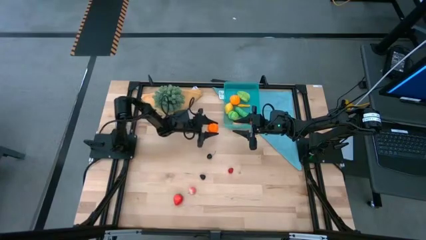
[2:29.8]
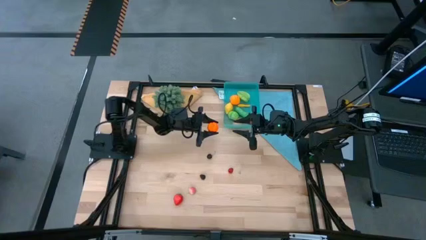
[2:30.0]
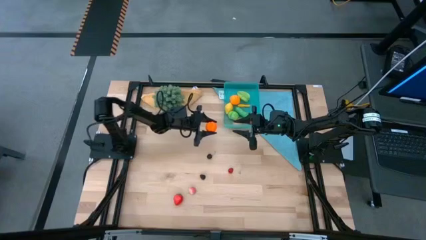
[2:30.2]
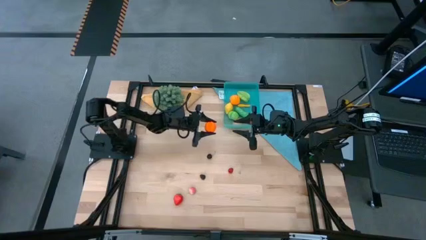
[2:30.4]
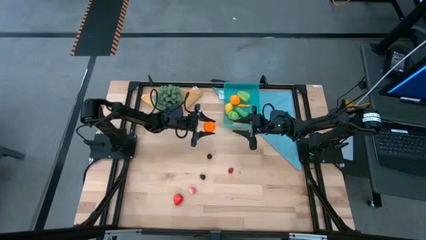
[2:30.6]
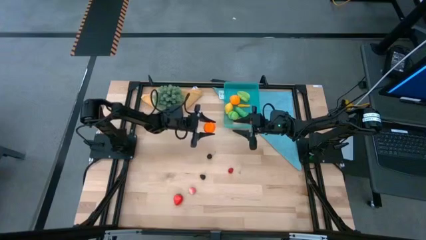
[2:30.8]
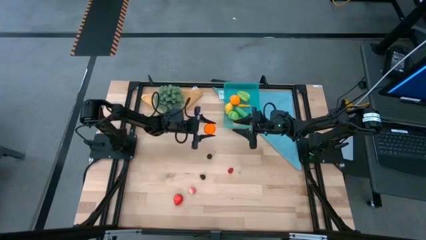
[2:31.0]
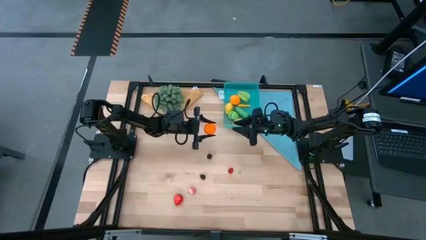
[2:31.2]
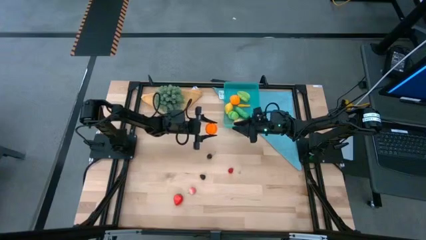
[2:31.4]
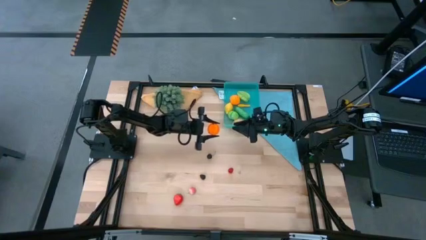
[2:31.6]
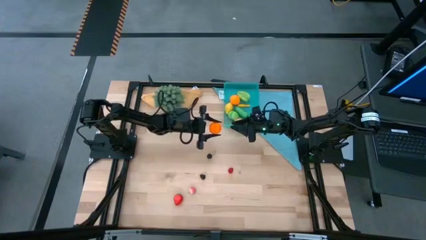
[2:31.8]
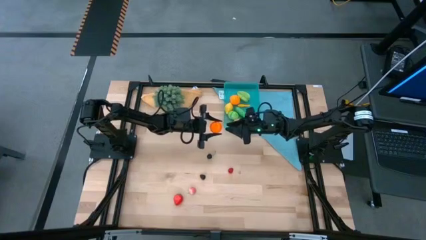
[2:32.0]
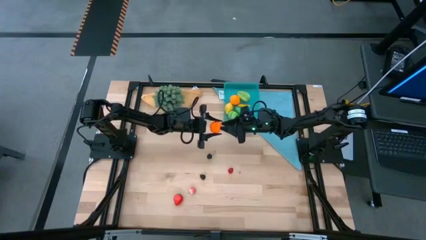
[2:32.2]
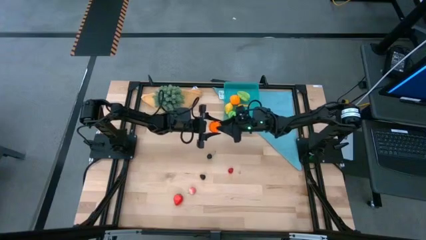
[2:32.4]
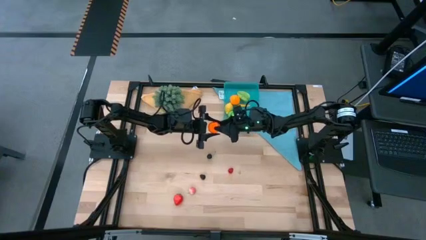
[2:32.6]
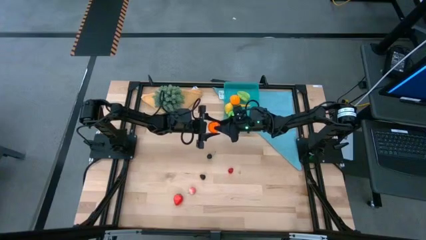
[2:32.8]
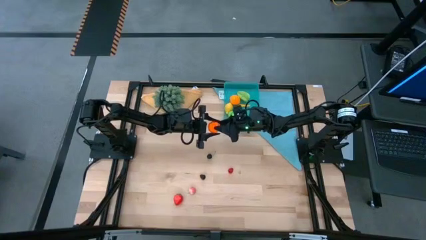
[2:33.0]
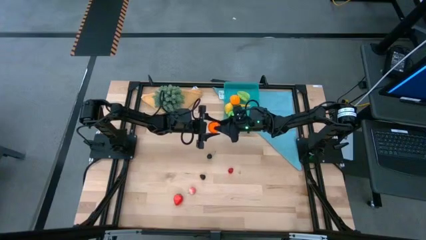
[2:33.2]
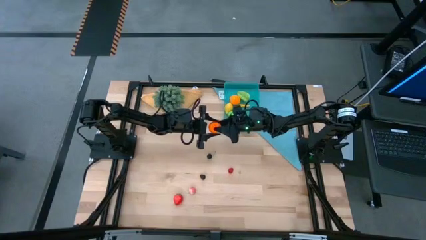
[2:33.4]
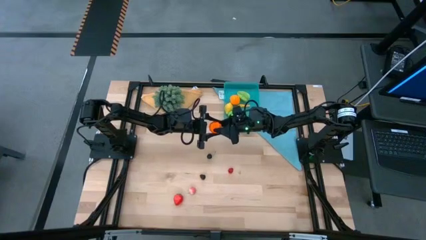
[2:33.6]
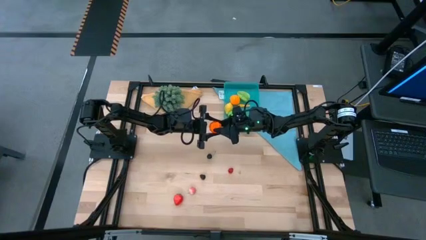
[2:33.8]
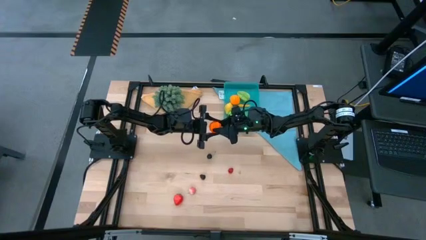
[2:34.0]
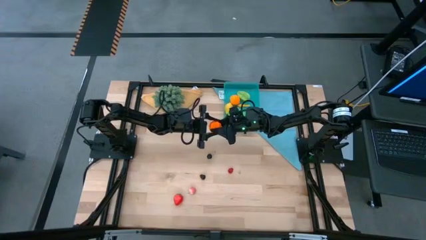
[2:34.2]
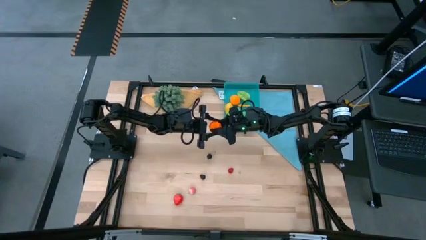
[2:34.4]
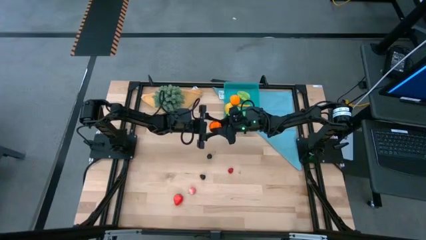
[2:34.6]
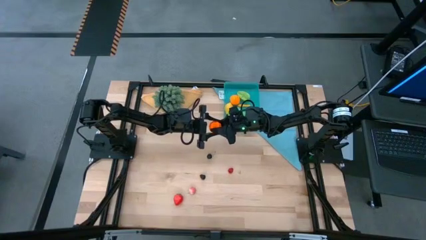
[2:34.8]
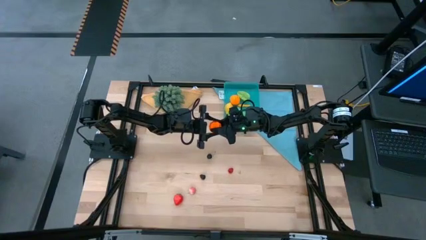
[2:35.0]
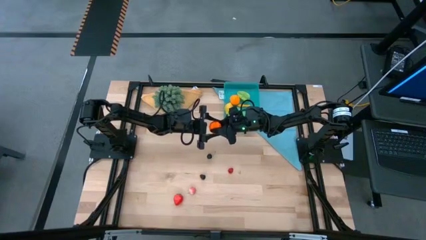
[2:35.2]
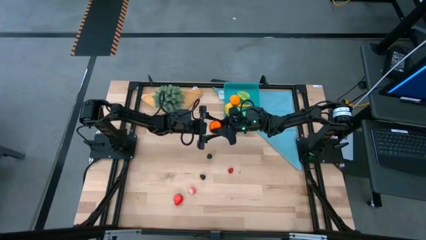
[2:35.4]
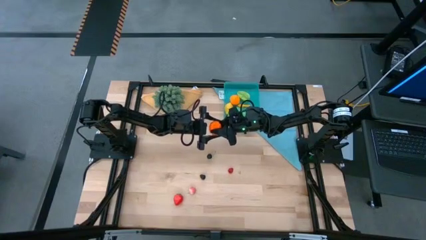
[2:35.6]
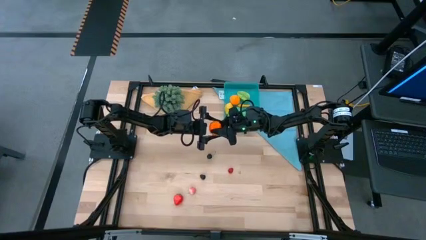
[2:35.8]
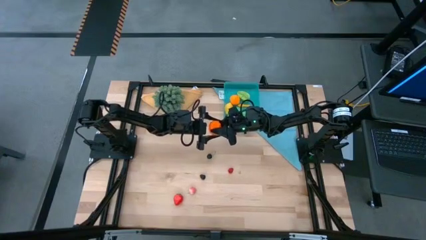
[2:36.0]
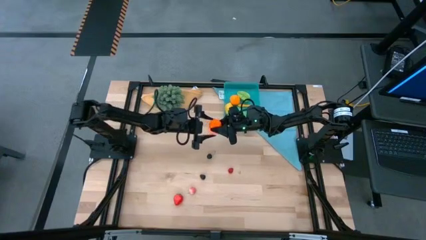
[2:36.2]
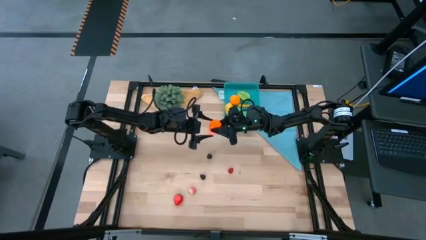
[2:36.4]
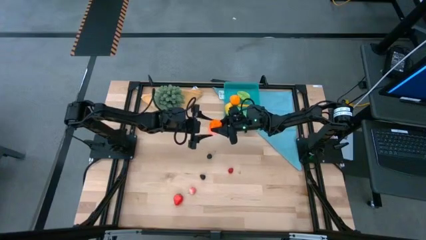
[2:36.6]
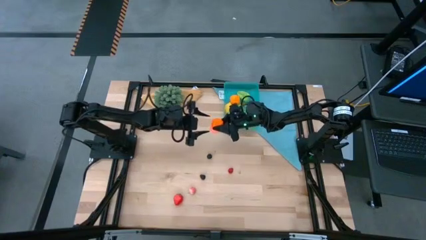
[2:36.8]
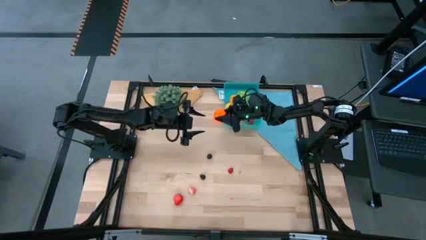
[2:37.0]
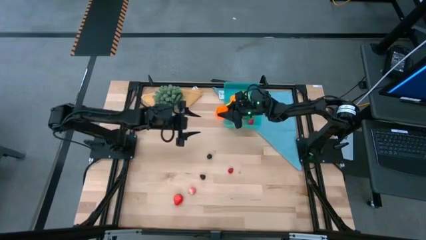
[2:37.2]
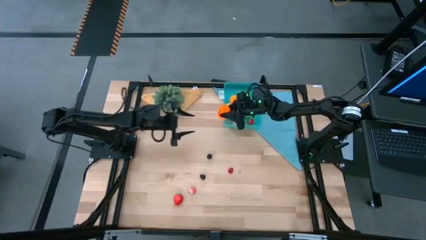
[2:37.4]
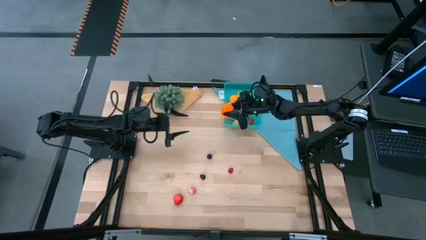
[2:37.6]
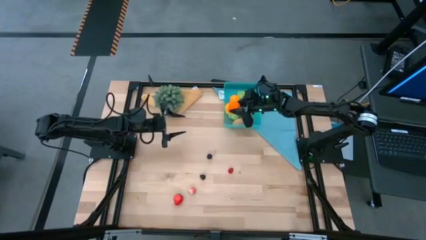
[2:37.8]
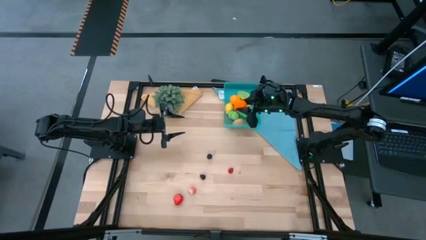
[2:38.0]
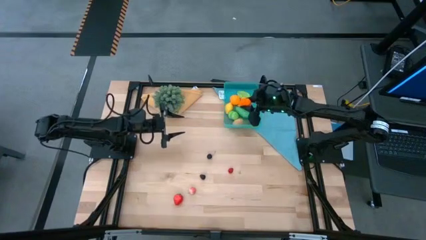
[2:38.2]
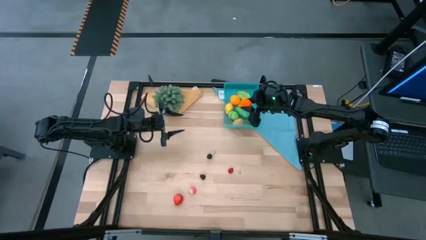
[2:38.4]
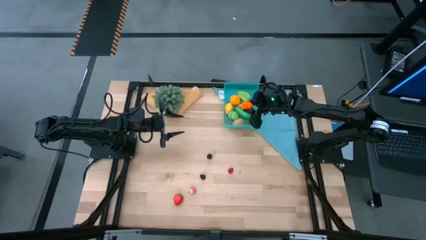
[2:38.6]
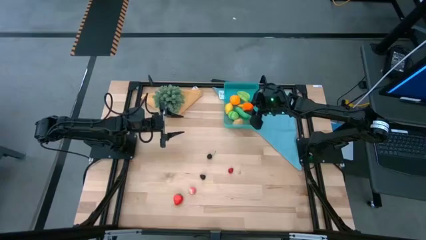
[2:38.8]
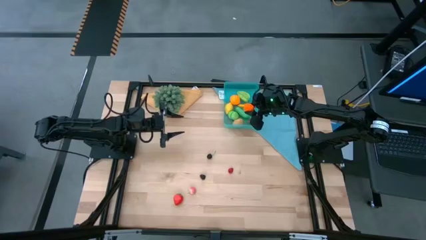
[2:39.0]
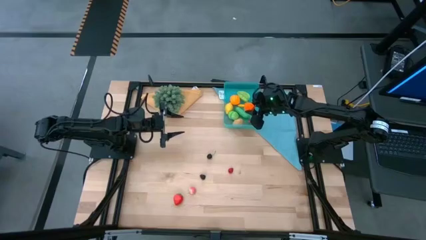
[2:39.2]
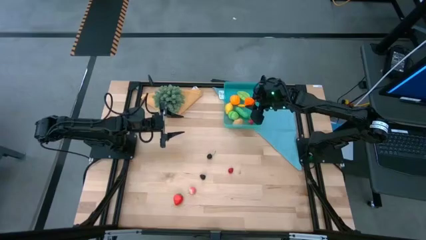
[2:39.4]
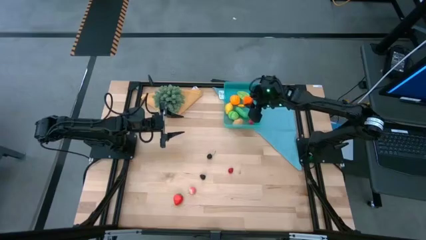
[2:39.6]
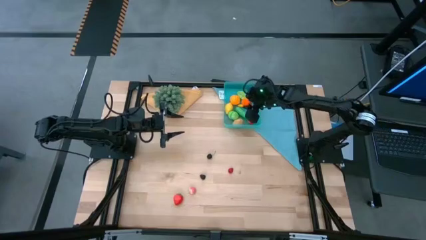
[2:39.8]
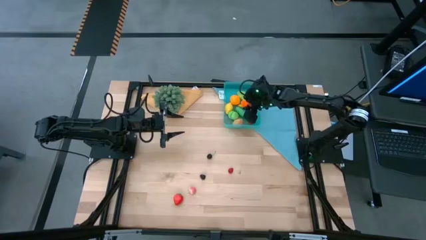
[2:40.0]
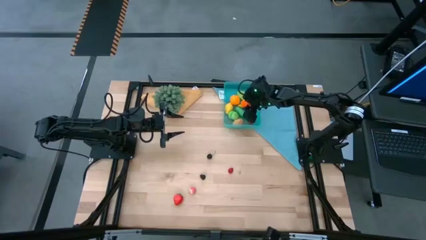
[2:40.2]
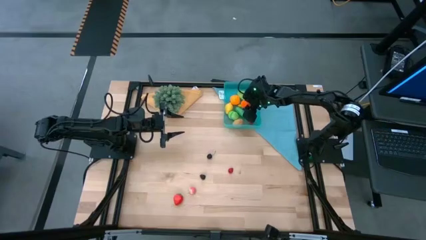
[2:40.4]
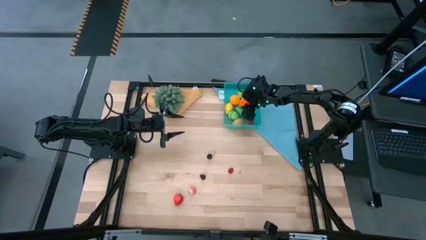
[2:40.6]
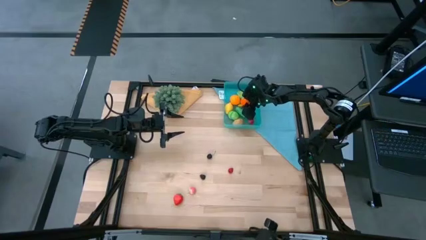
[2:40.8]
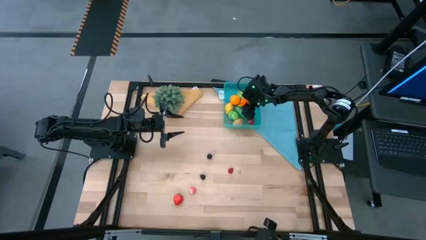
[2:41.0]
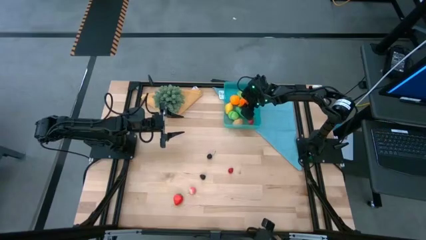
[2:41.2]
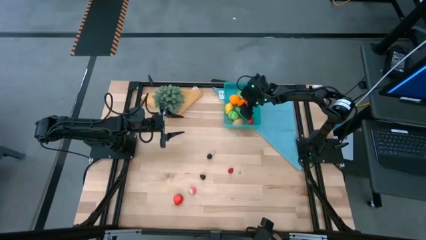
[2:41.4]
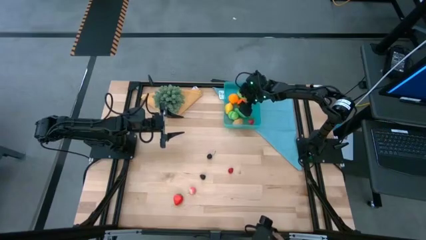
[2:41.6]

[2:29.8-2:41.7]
Task: Pick and placing Produce into tupperware
Put the orange tangerine into the blue bin

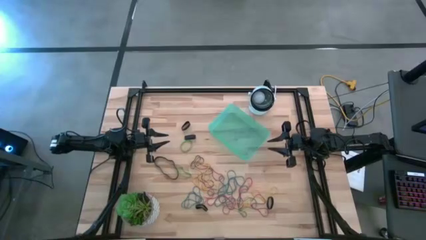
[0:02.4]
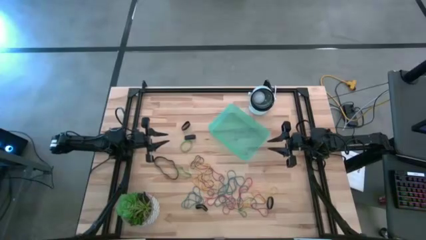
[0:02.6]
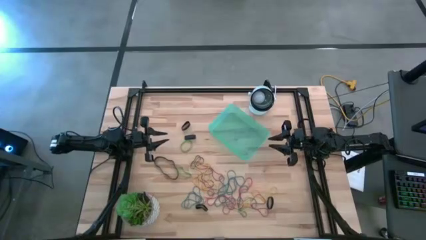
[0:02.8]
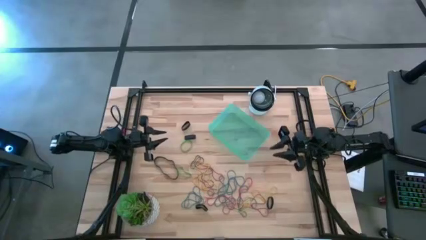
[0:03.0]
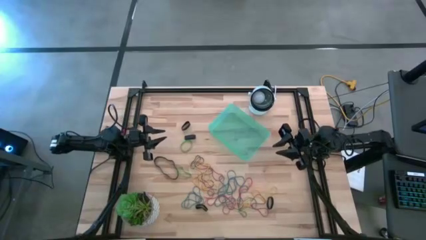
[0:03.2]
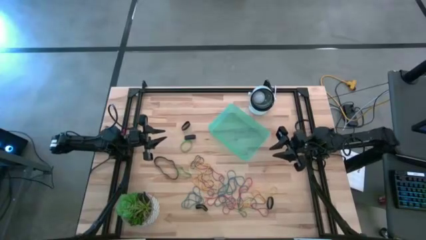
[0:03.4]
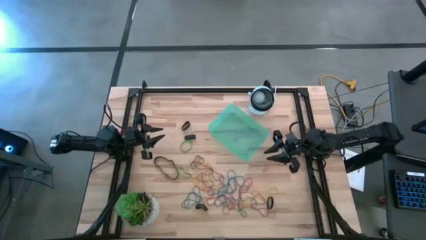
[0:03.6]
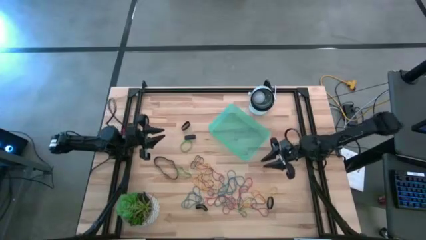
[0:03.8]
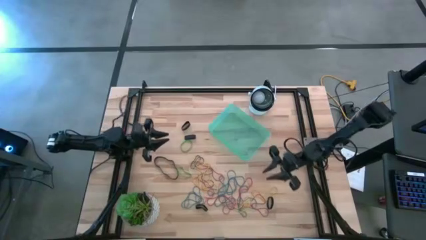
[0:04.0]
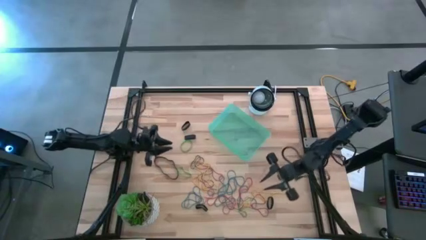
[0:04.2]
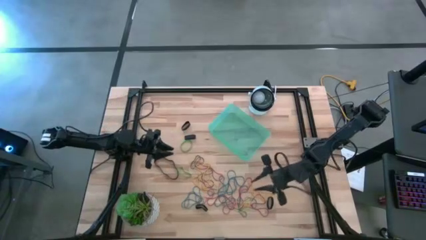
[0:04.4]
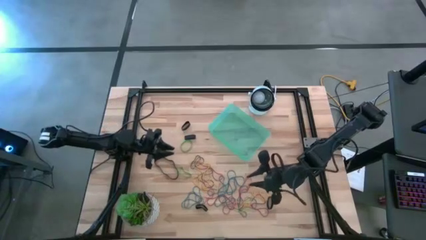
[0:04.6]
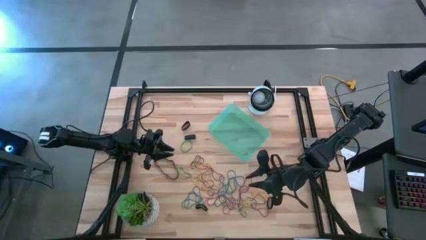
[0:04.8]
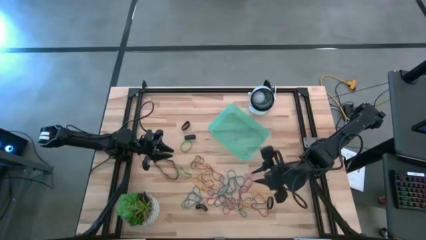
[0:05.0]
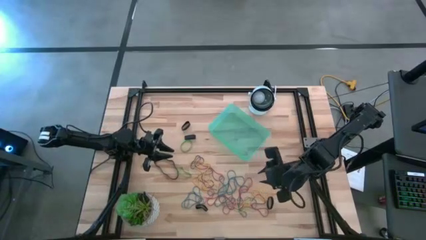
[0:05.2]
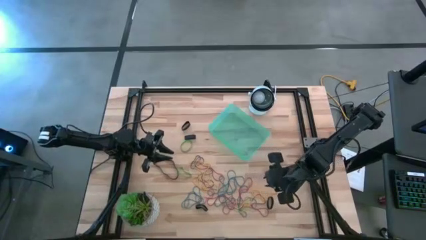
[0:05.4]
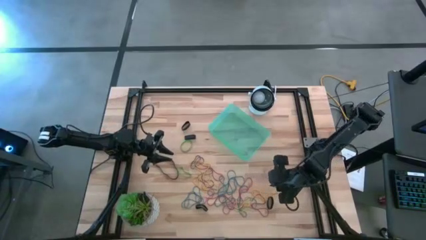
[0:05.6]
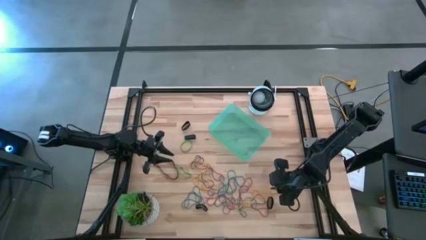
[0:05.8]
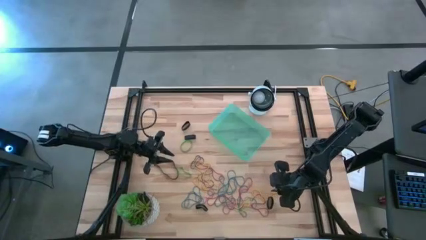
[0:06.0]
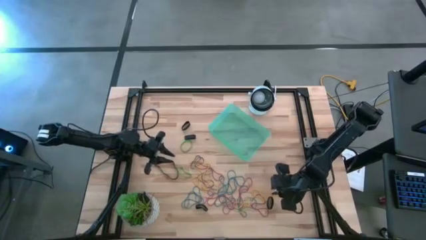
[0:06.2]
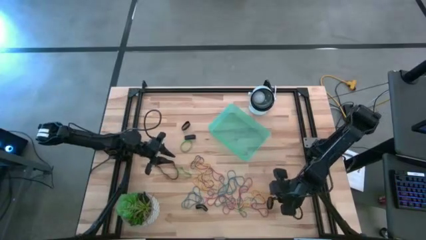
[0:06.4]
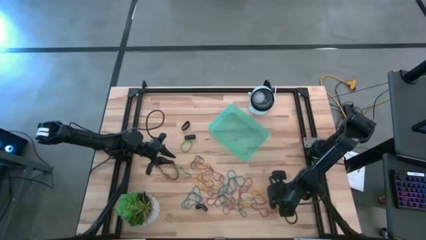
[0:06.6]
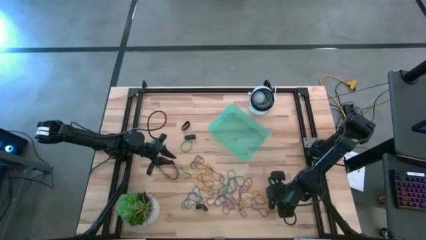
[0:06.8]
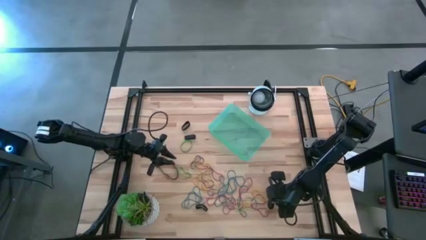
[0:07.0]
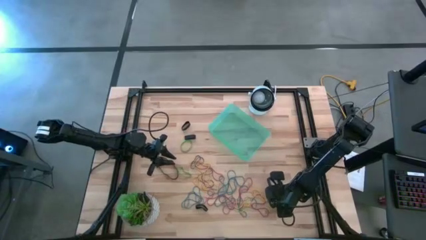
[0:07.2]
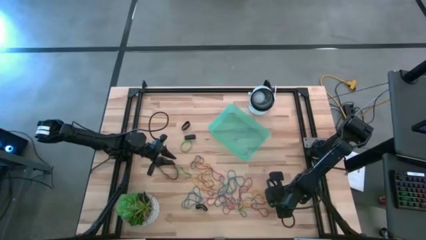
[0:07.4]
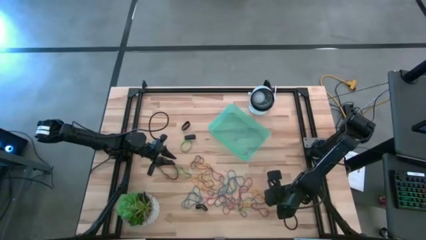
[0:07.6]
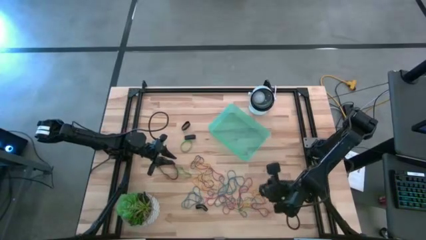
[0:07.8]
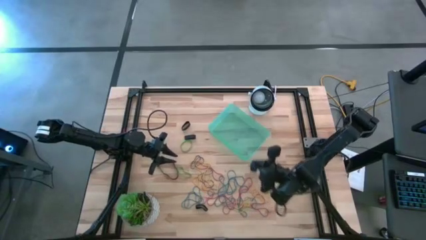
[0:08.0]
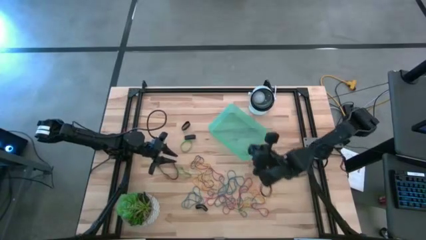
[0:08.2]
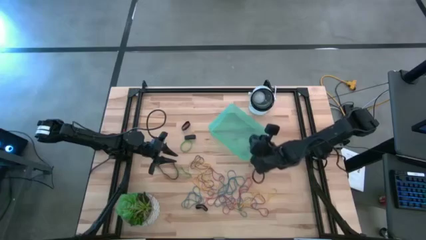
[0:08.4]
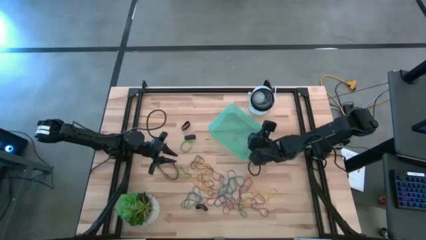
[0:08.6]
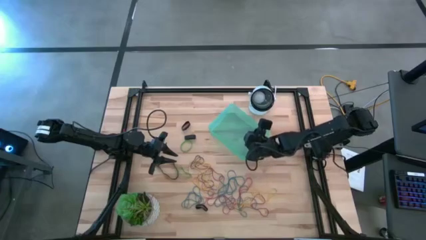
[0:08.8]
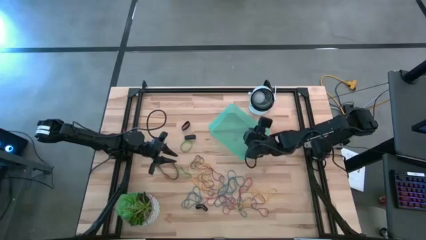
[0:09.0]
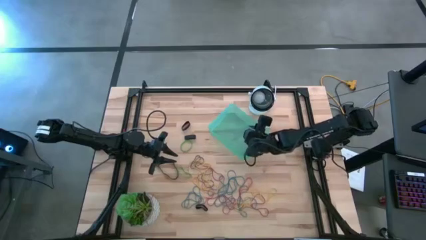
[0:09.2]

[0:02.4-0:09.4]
Task: Pick and place rubber bands into bin
Put the black rubber band into the blue bin
